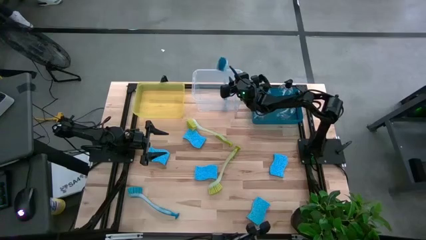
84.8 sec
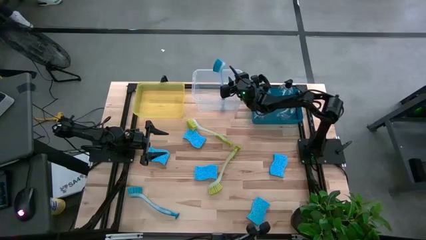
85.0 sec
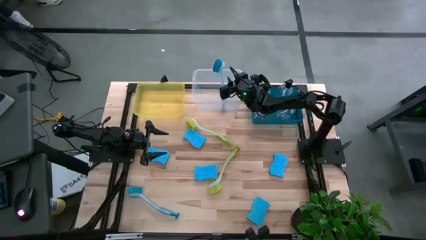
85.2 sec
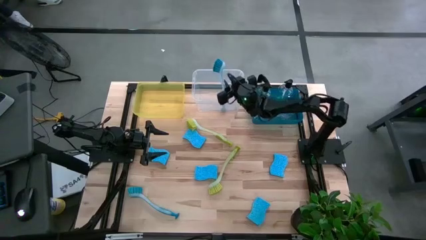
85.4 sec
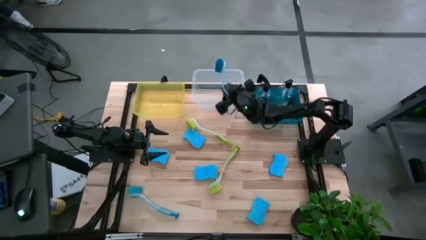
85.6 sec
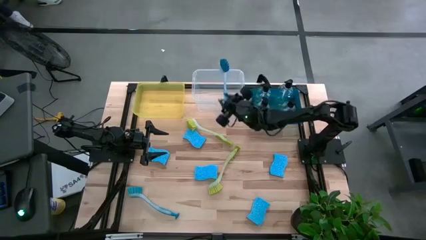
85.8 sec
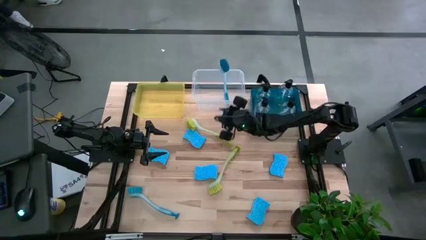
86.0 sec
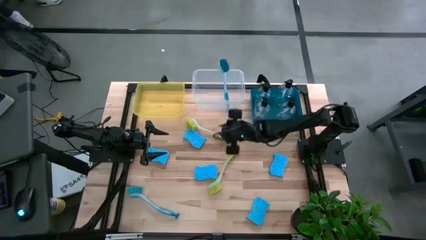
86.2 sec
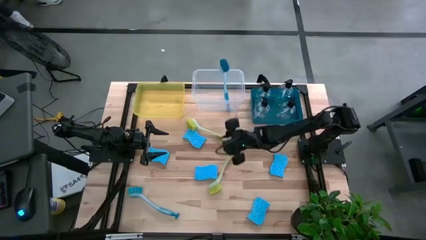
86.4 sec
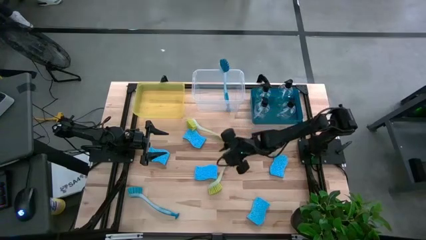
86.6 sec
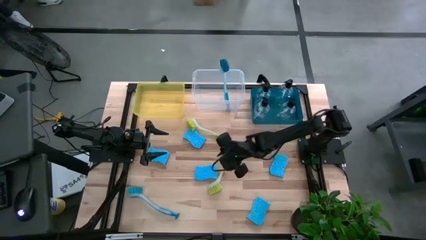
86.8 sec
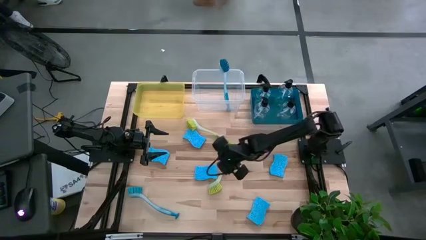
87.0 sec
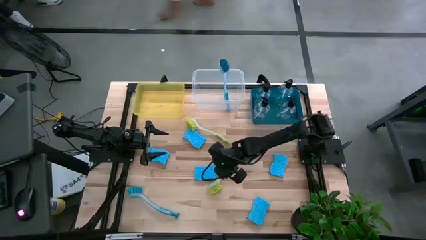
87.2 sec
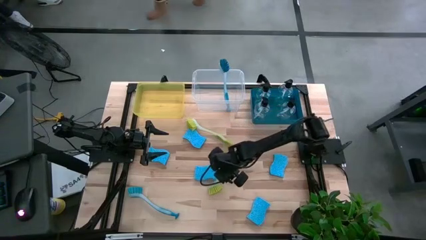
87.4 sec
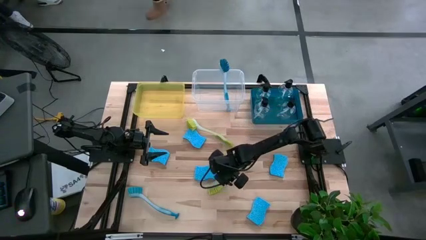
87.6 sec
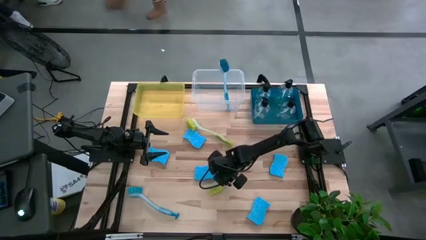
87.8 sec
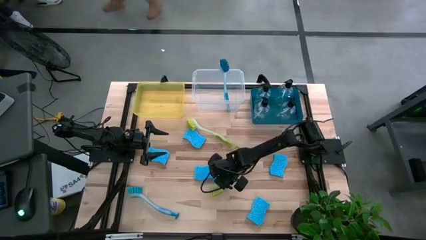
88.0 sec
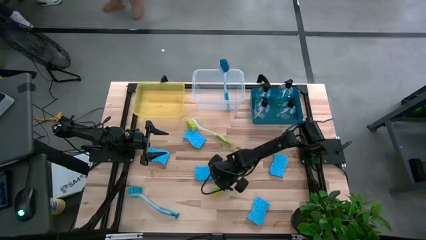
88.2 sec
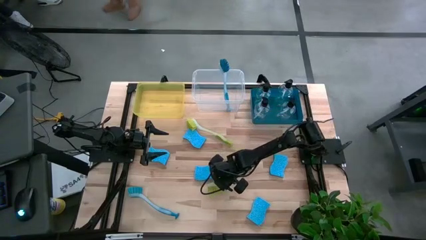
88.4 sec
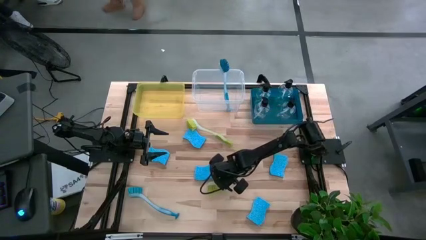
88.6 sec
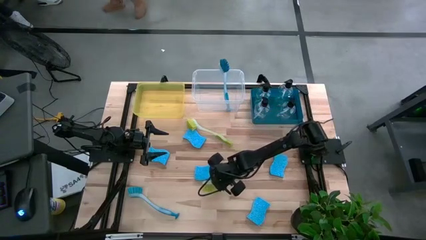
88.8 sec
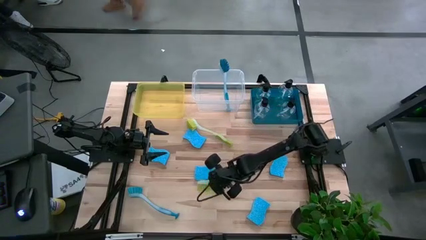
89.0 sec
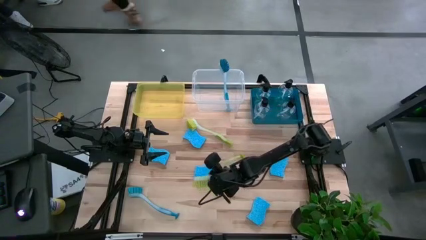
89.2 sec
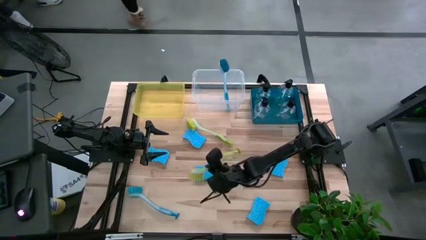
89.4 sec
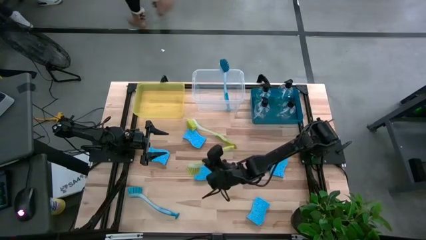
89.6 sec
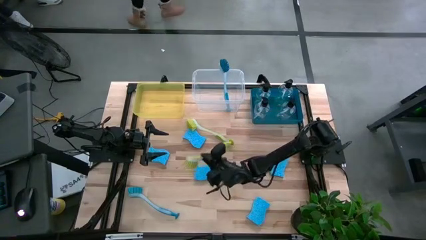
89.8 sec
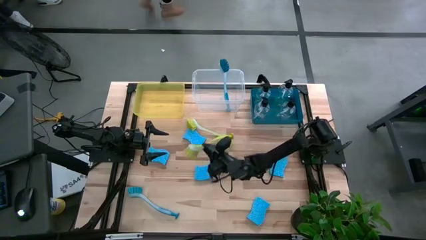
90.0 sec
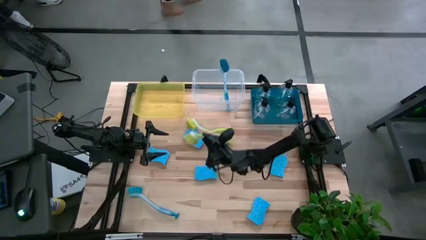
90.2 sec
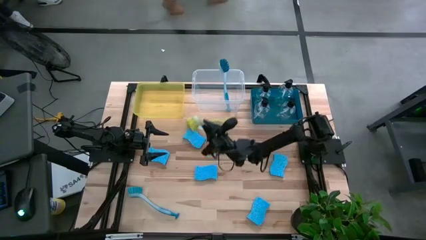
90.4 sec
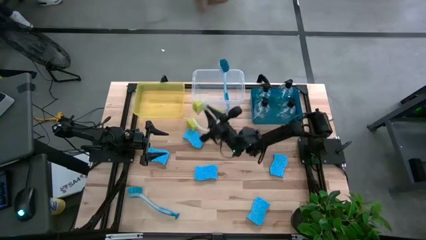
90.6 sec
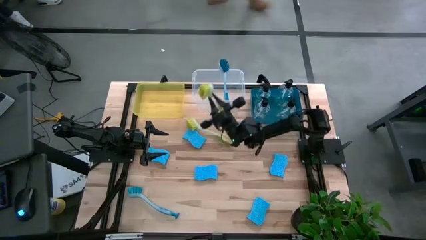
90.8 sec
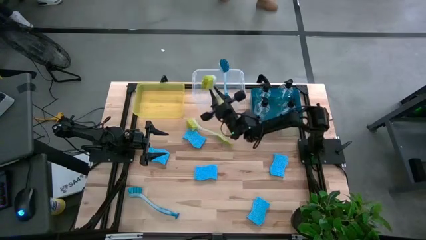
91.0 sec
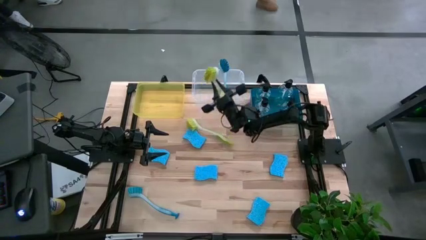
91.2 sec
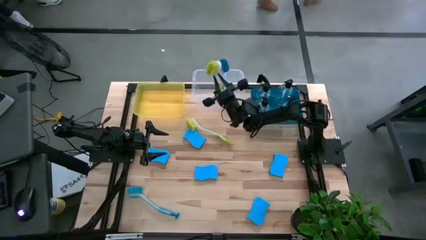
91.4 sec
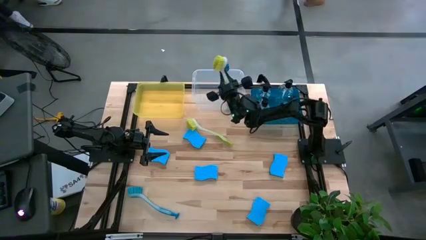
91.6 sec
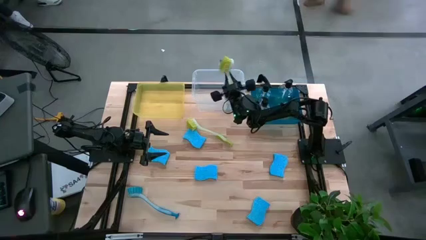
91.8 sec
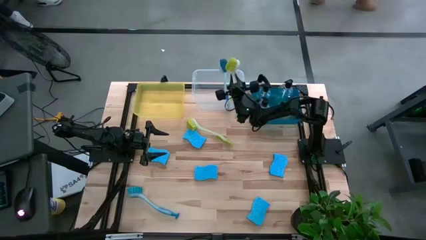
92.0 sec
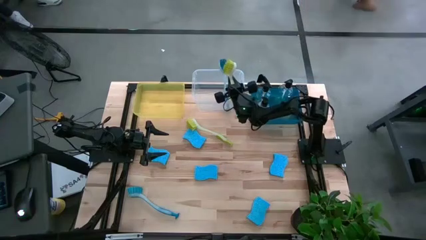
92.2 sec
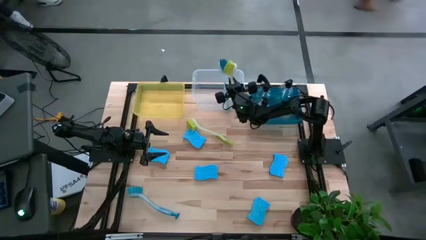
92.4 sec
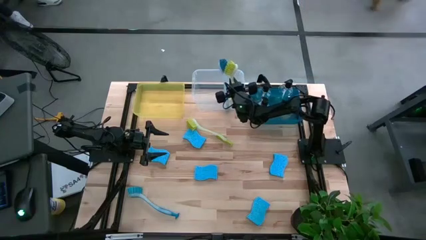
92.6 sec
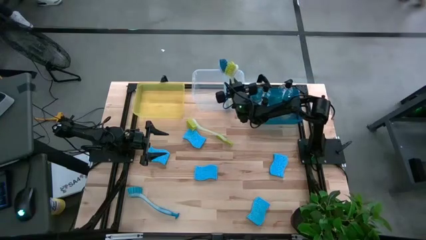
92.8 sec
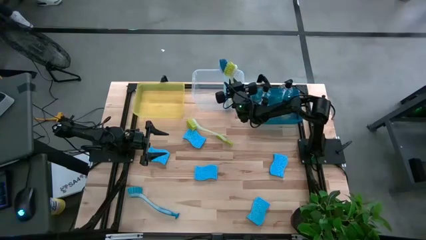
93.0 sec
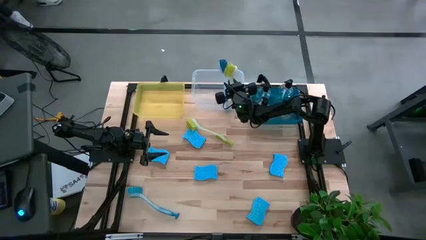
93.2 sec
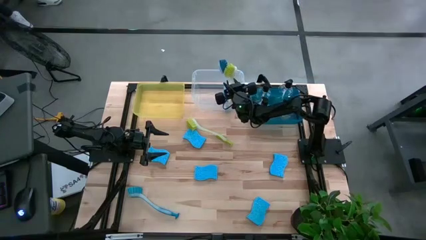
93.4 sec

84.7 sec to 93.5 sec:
Task: Pick & Place Kitchen Sink Supplies
Put the green dish brush into the transparent container

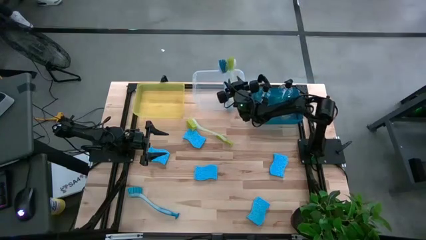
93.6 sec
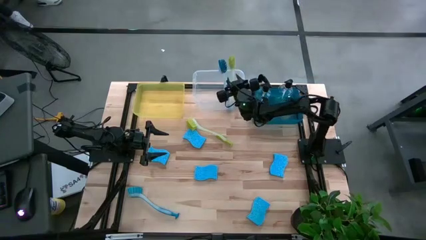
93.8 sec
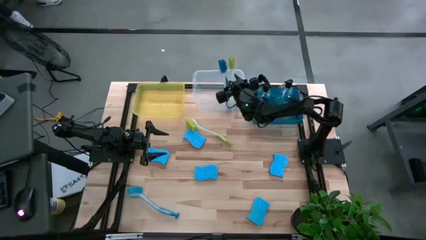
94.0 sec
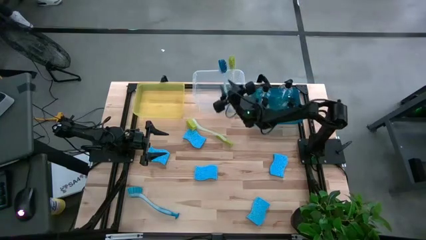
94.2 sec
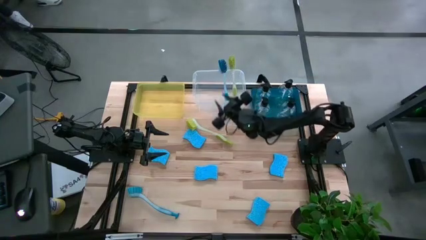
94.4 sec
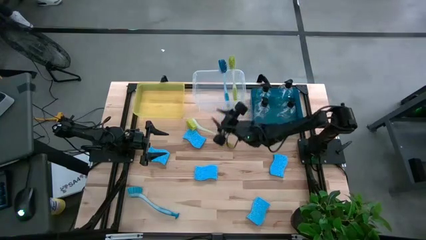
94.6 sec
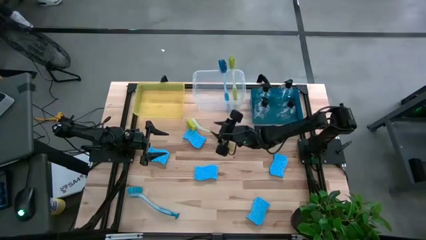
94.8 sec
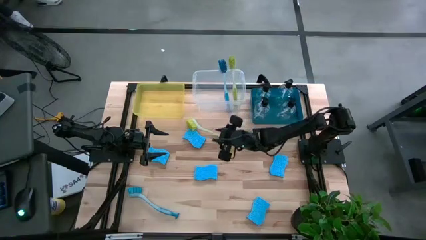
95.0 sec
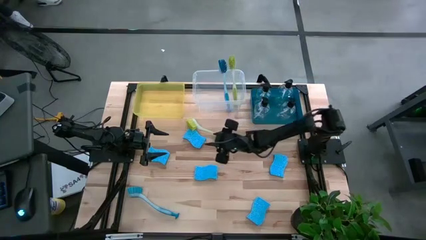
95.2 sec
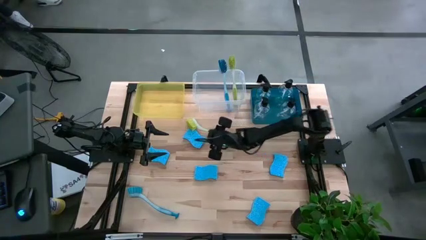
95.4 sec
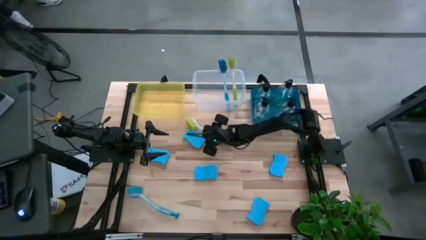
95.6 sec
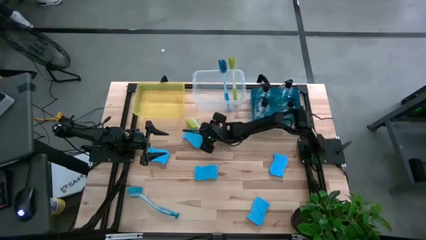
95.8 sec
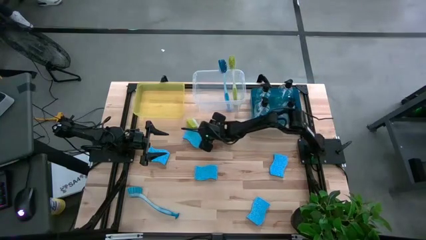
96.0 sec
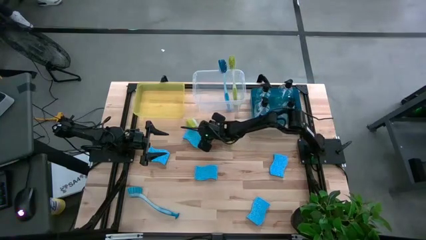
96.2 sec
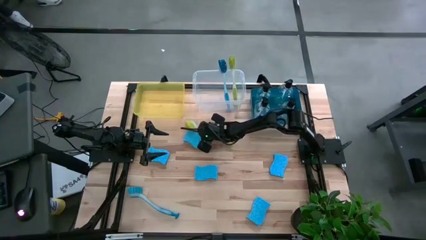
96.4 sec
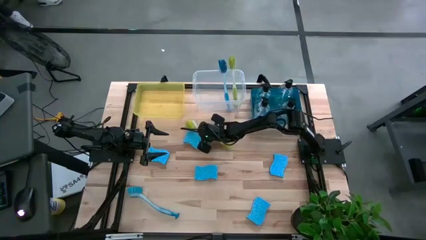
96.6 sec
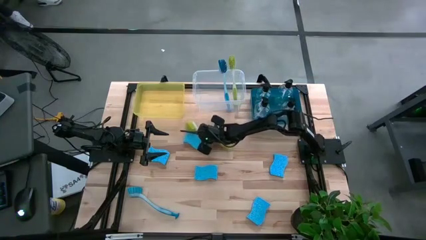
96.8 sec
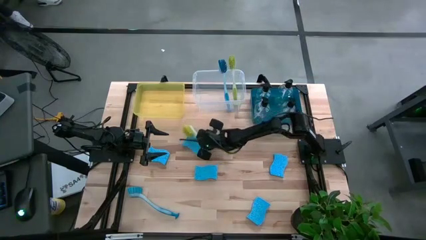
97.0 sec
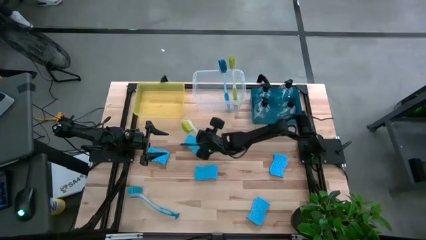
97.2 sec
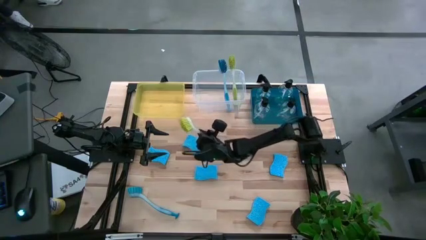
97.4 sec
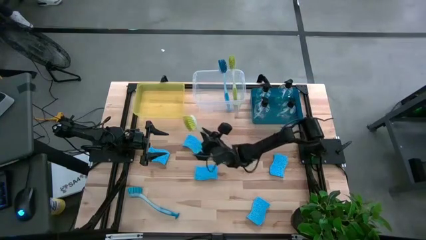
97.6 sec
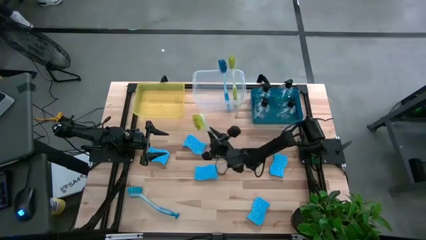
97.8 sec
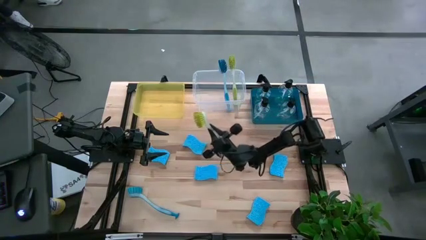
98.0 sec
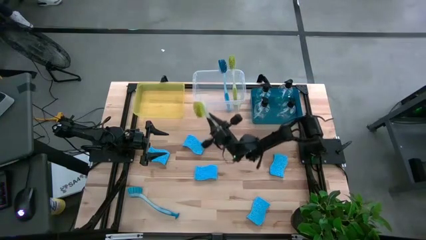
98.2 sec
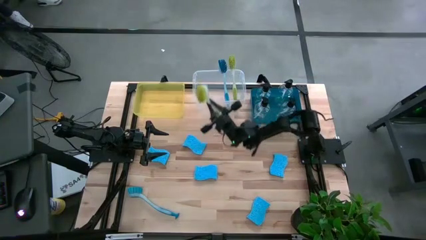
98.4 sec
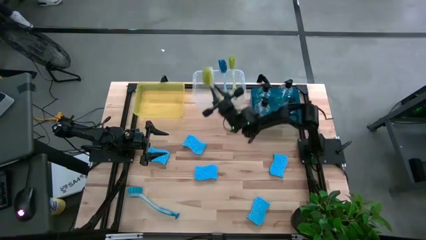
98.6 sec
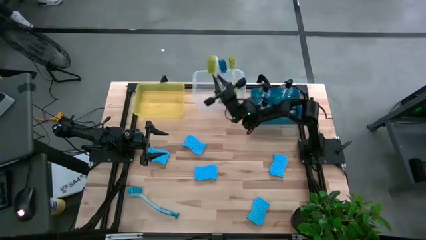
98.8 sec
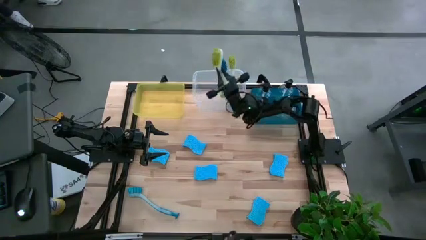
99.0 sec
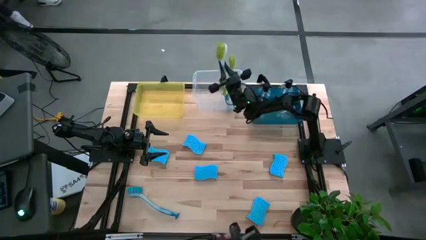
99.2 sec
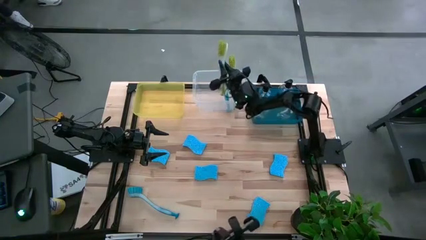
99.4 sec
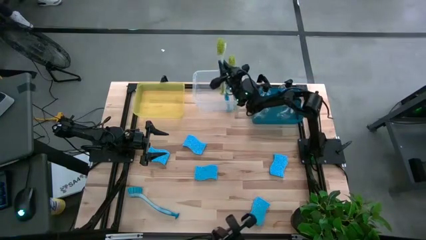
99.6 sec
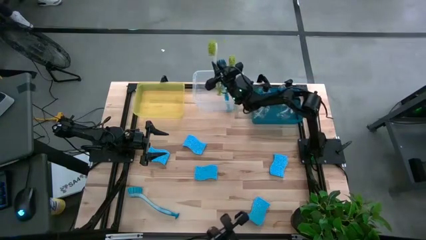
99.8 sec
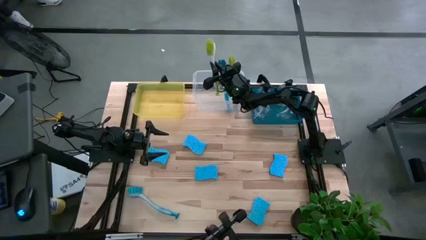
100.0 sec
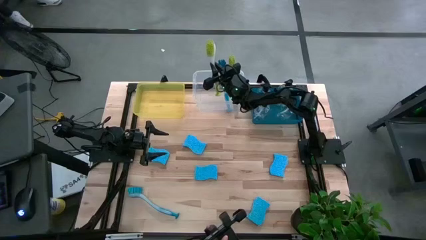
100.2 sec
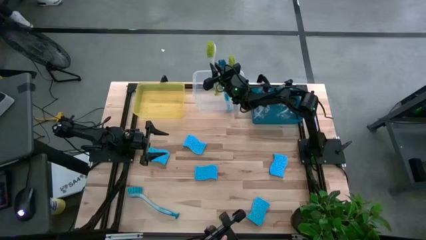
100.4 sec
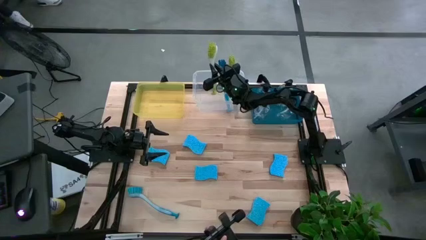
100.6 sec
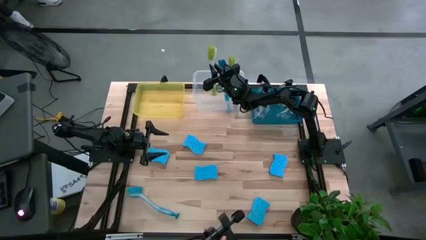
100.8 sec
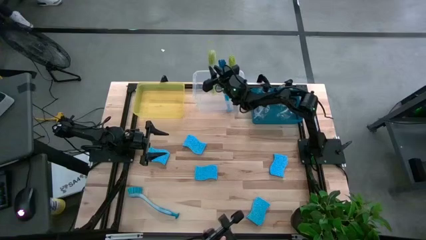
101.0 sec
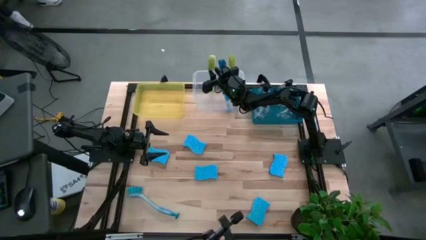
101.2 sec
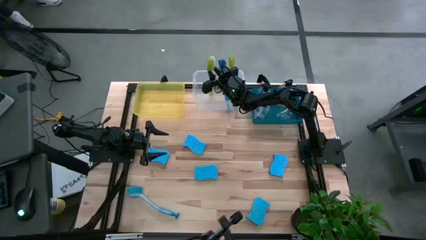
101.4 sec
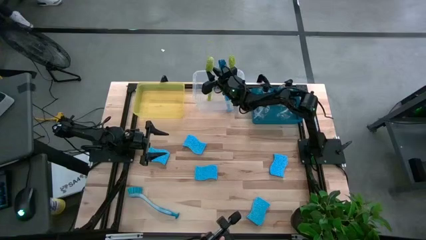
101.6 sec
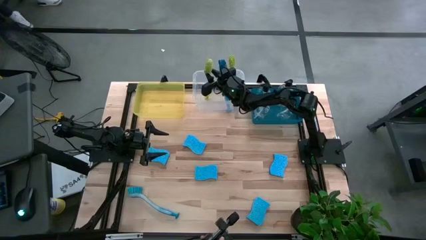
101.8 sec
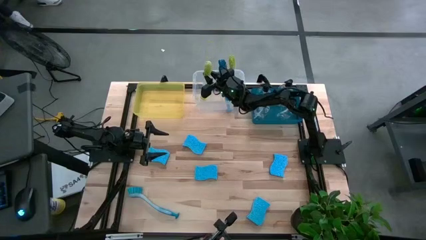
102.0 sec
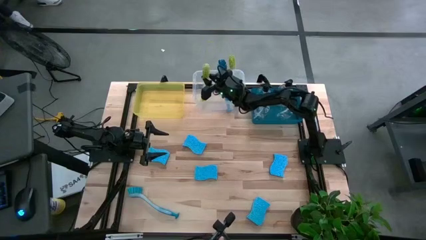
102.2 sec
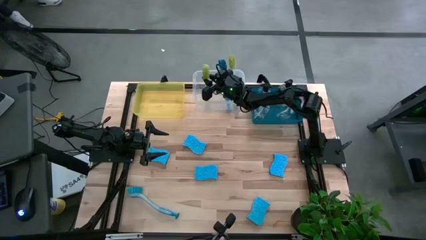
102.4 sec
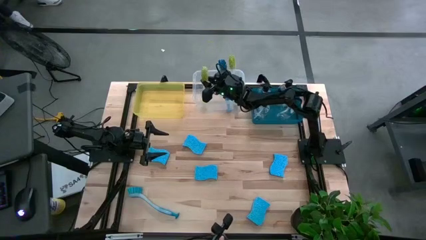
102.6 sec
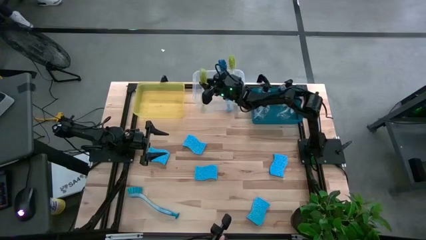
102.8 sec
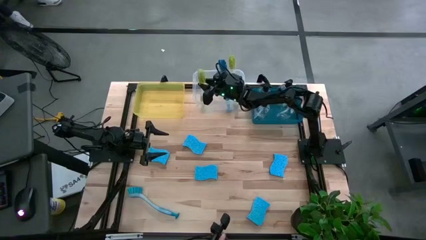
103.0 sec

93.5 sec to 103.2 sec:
Put the green dish brush into the transparent container
